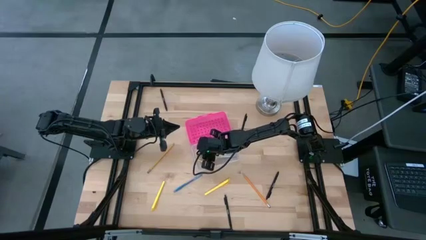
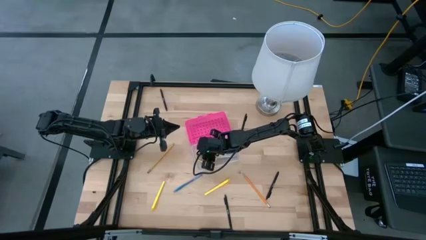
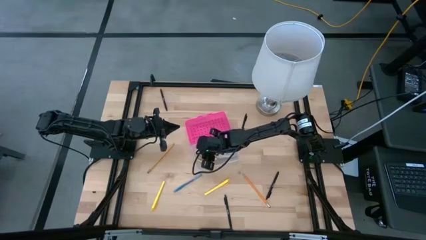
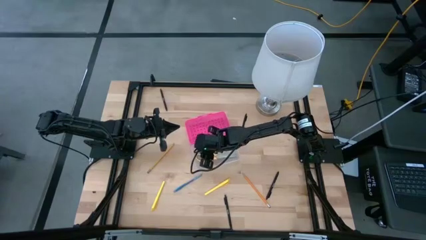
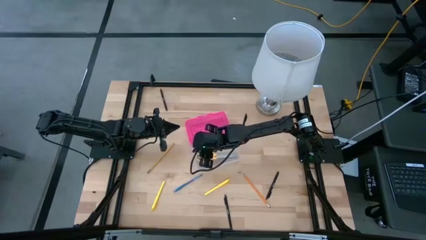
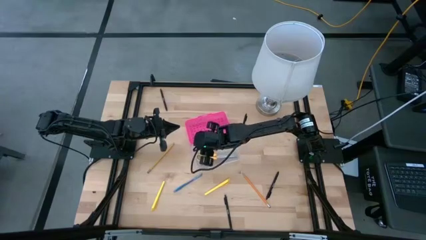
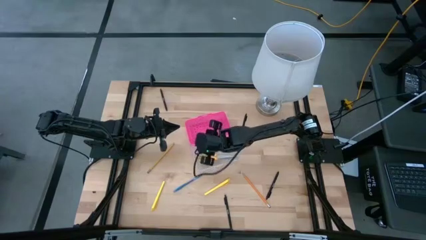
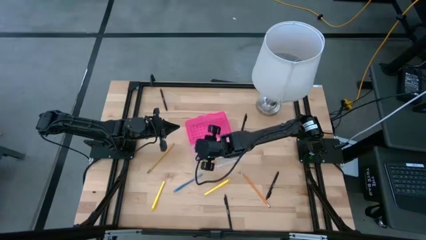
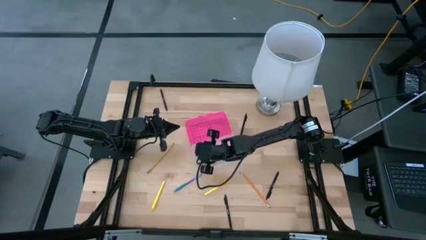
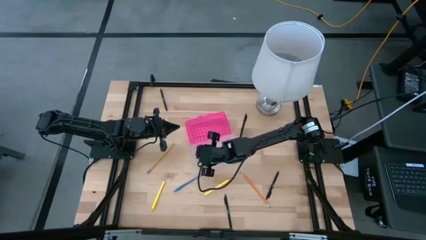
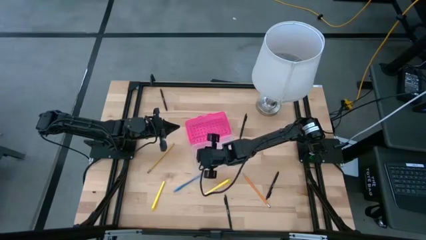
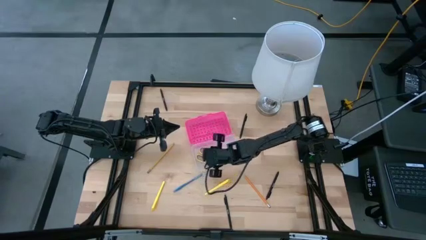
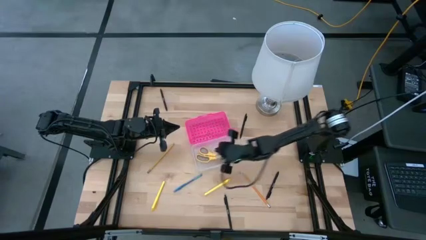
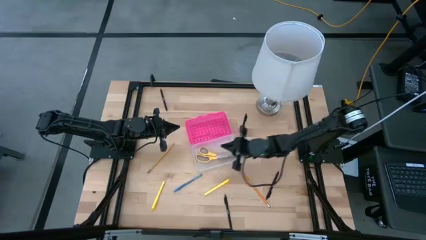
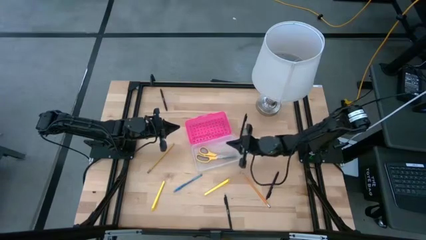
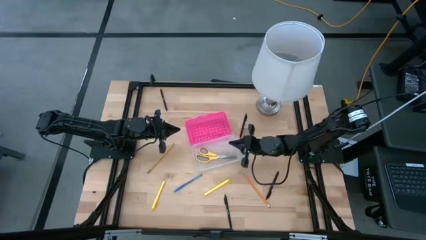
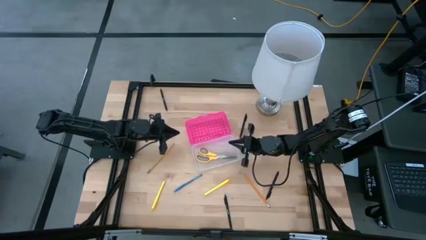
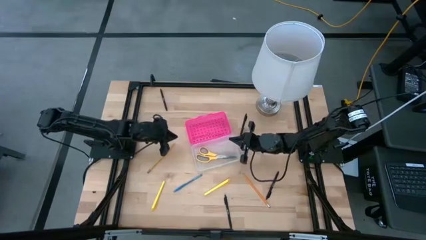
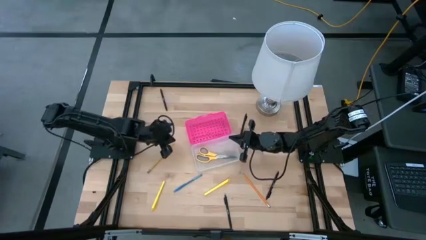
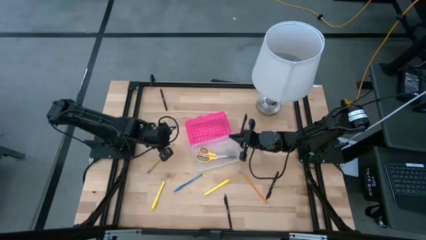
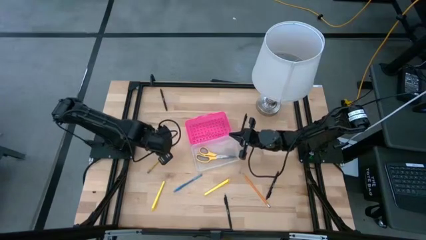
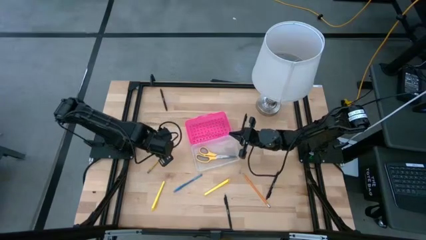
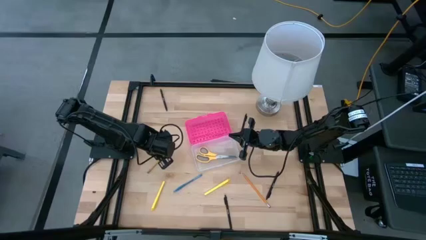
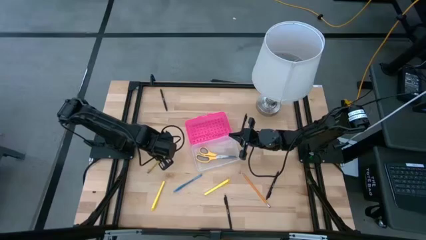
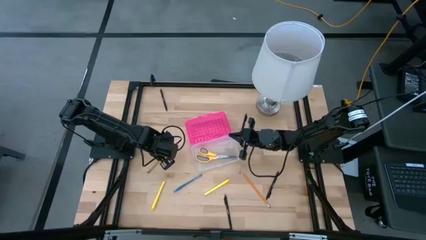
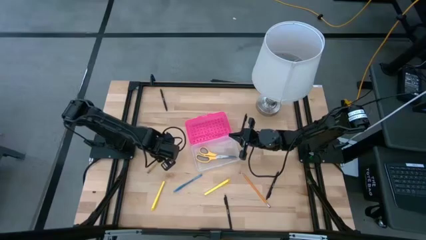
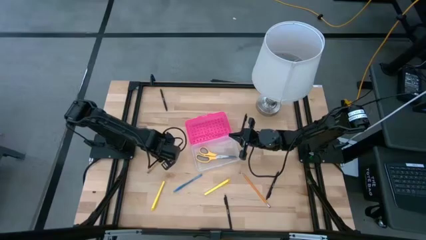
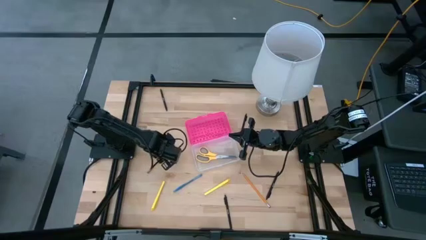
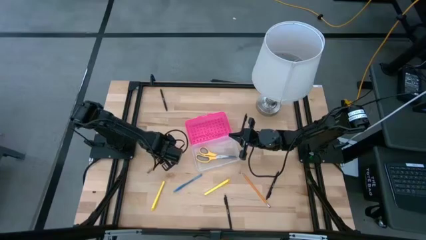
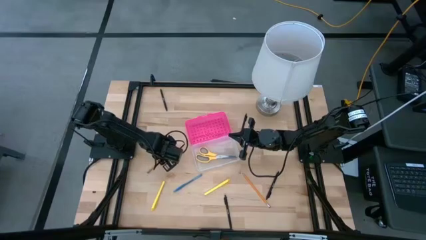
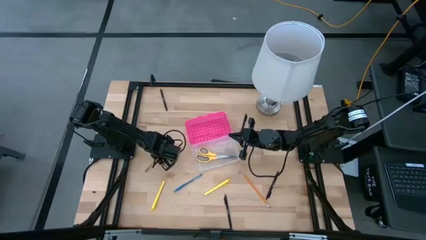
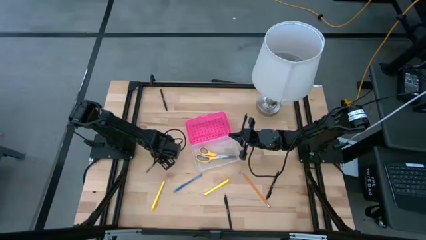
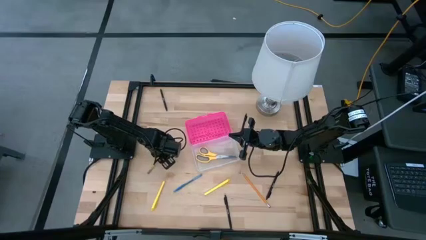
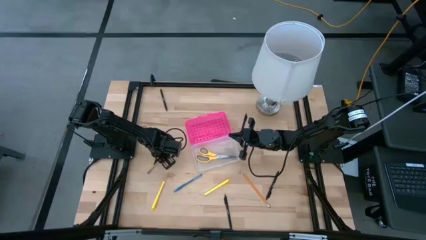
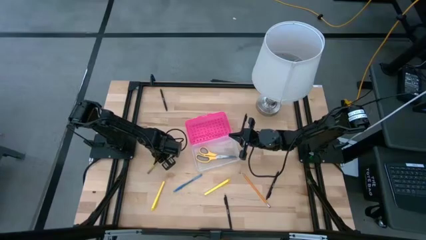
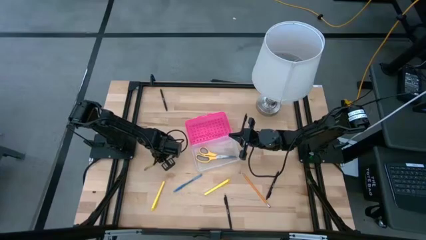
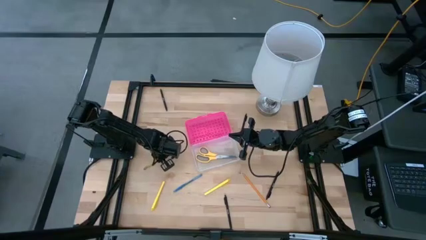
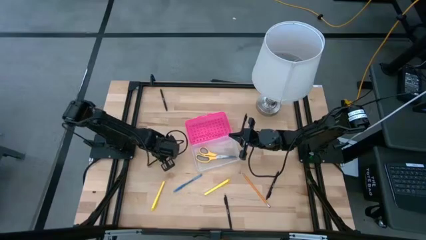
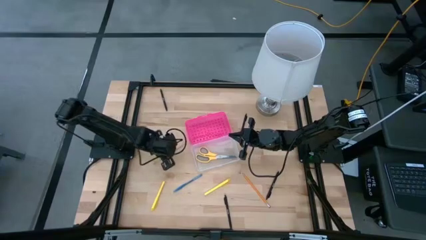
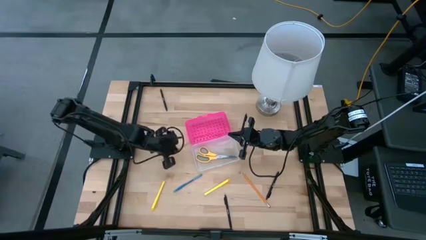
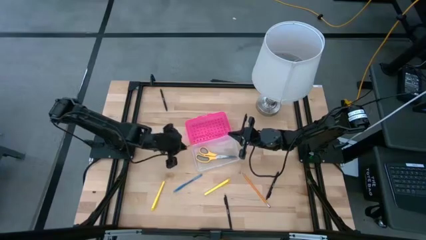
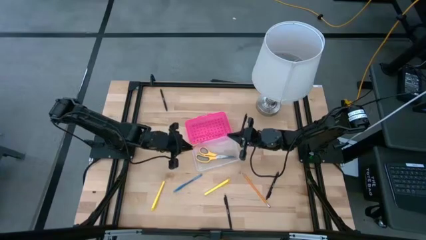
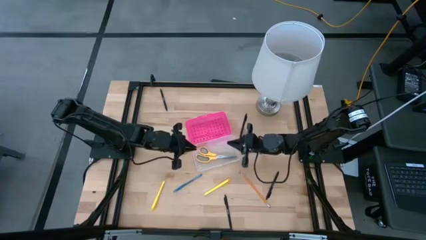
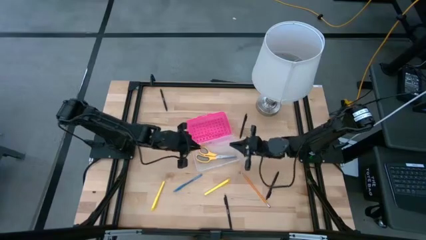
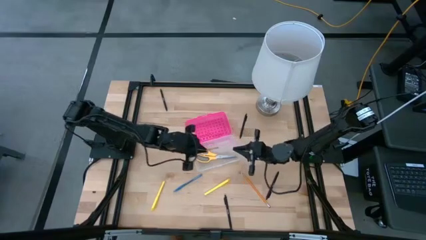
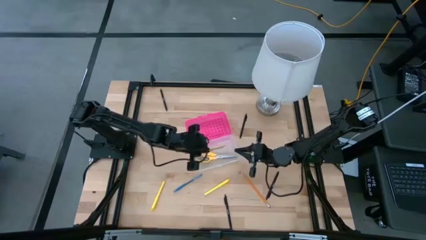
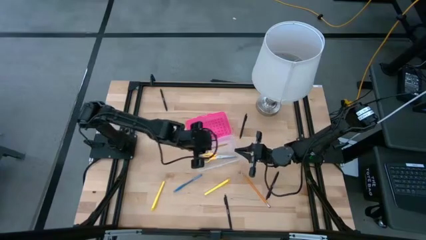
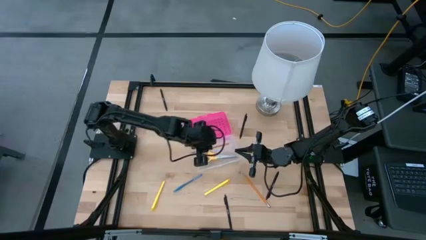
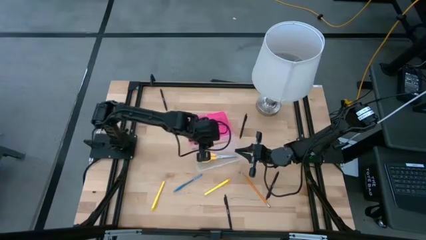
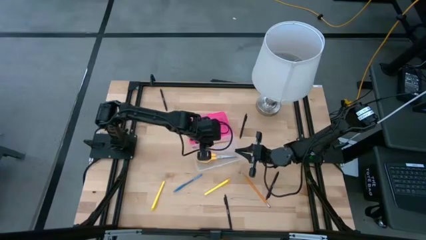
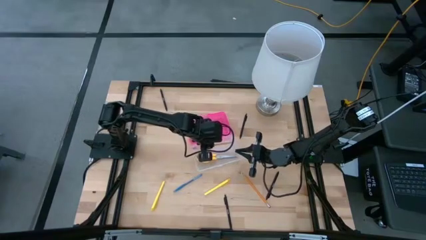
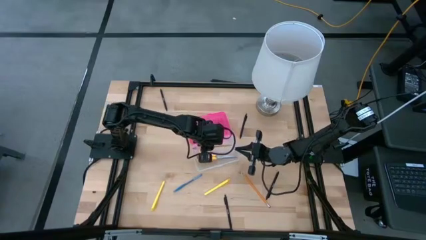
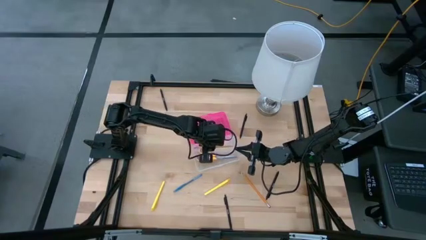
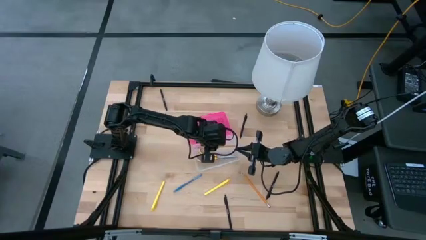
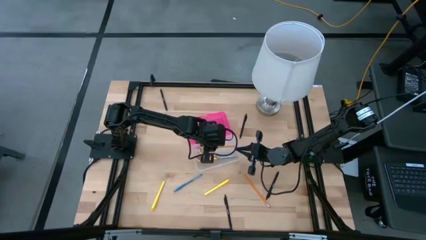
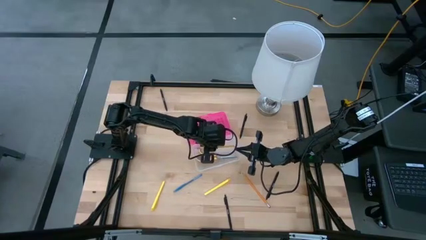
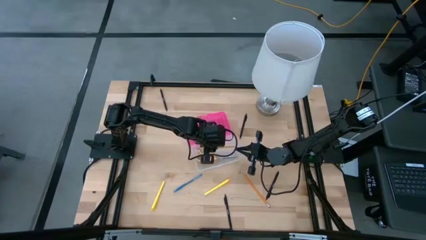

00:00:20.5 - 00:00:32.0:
Task: Pick & place school supplies into a supply box
Put the yellow pencil into the pink supply box

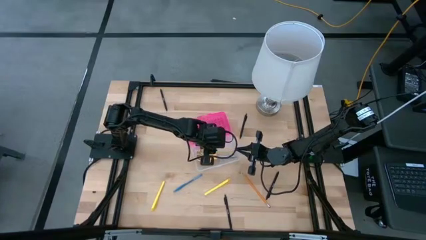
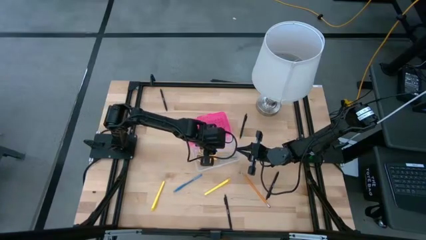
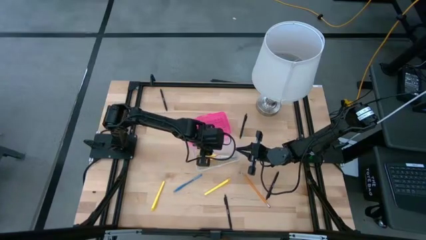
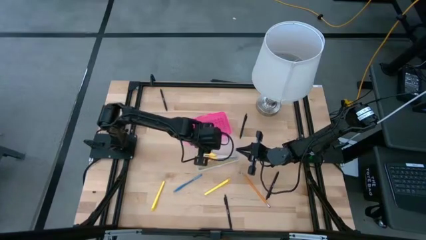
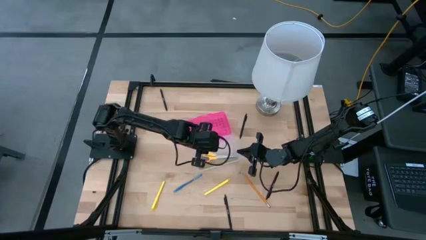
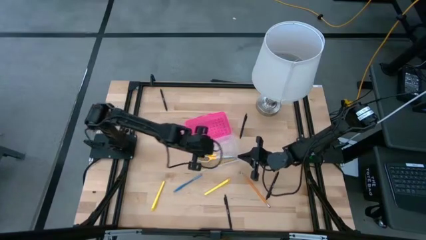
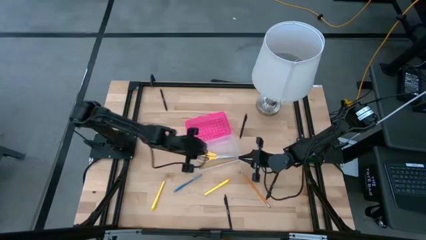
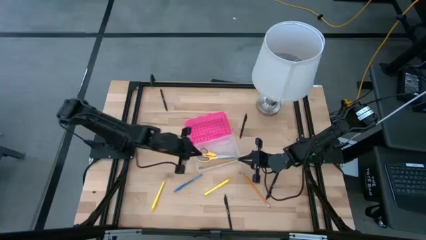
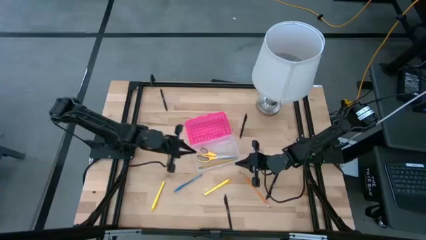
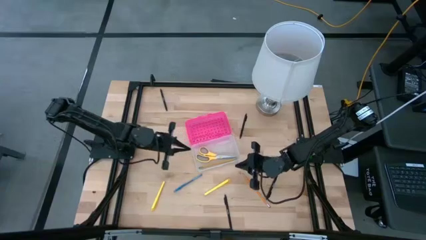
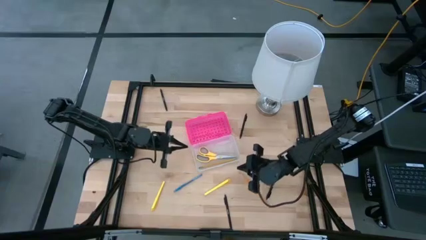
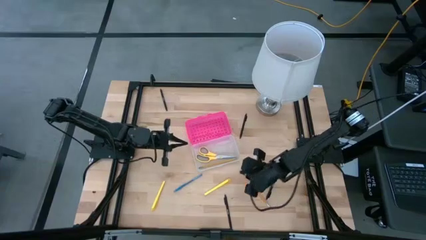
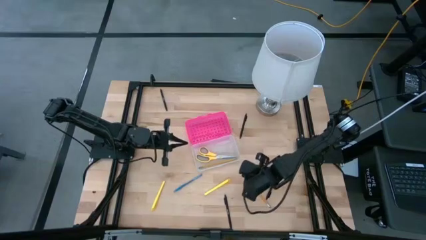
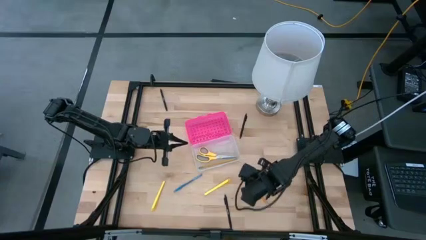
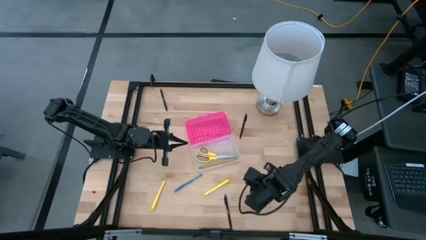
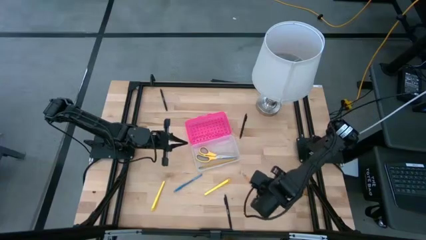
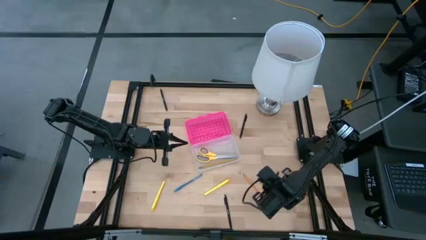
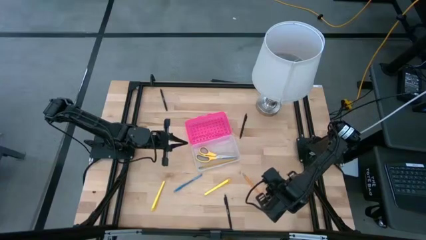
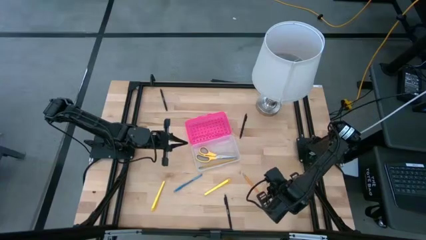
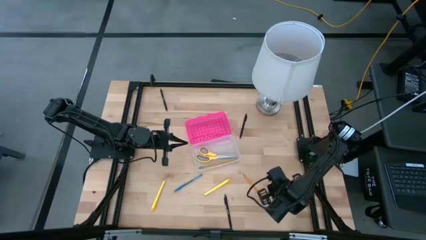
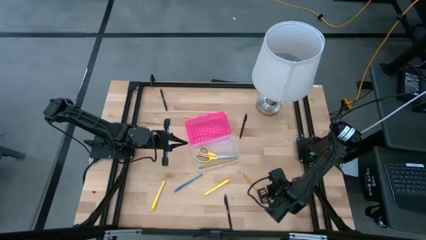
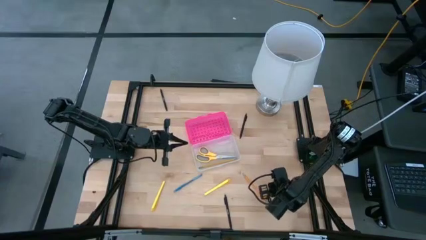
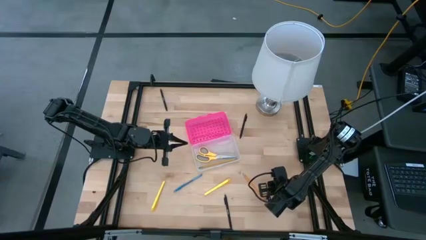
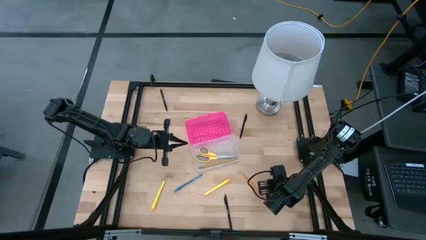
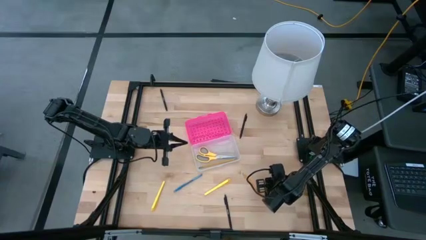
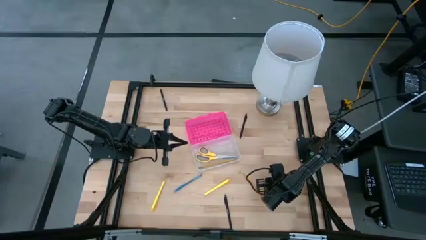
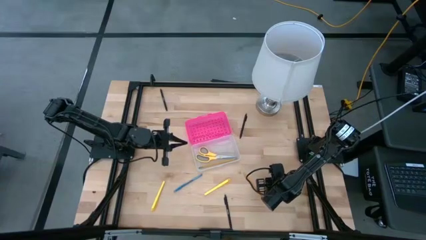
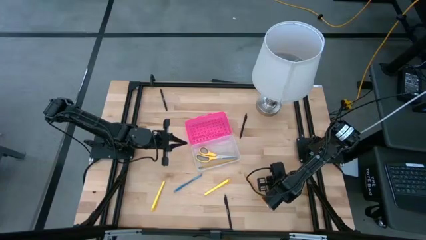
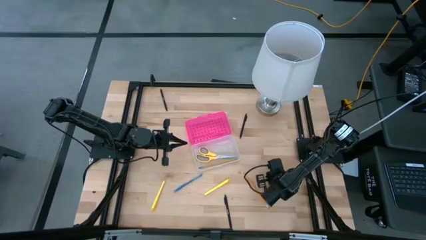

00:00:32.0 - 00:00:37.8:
Put the black pen into the pink supply box
